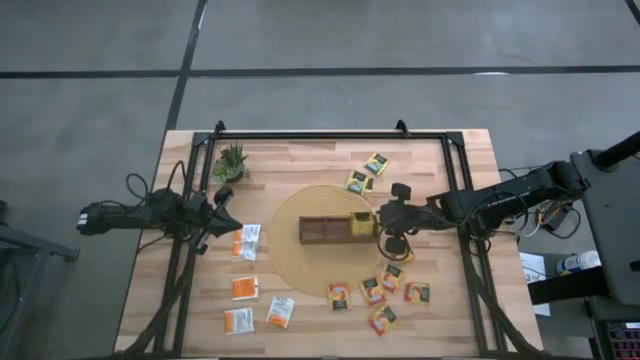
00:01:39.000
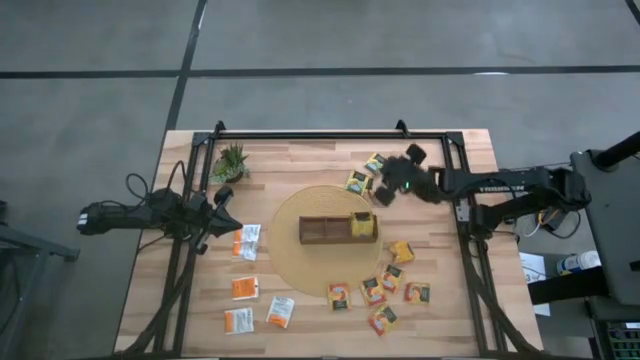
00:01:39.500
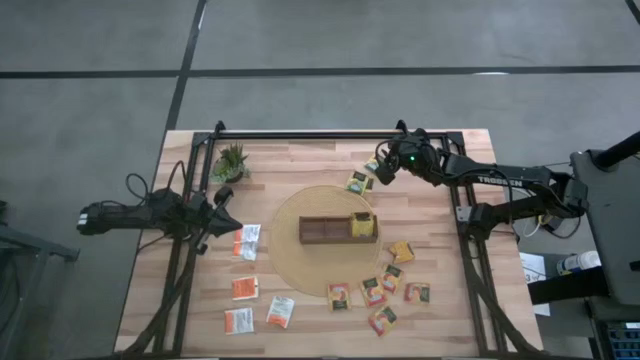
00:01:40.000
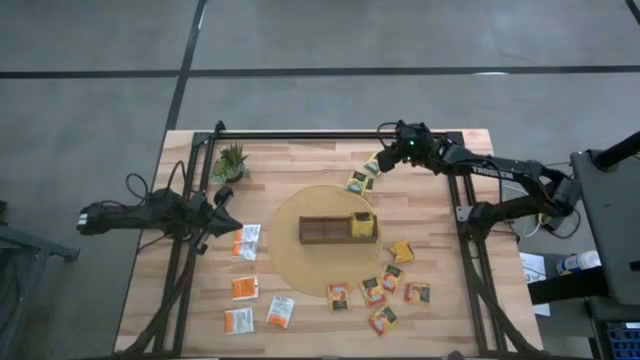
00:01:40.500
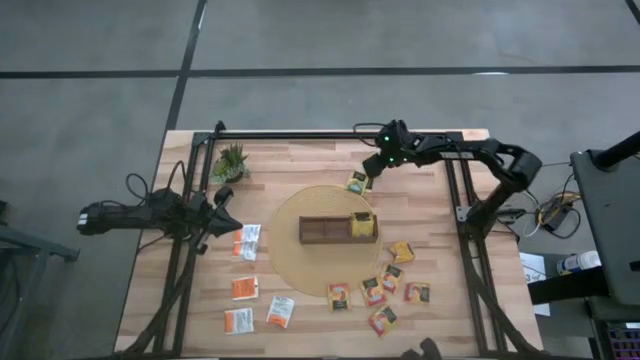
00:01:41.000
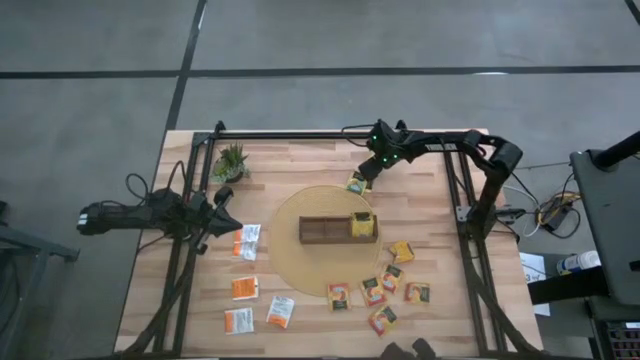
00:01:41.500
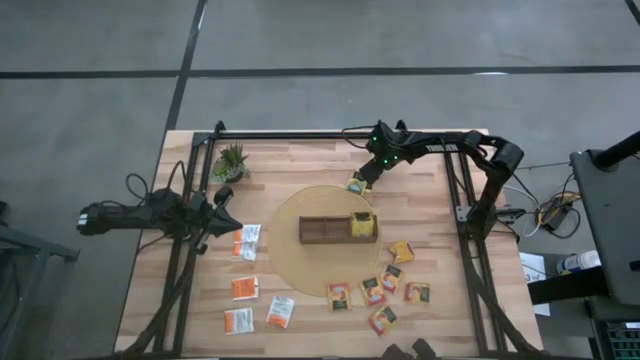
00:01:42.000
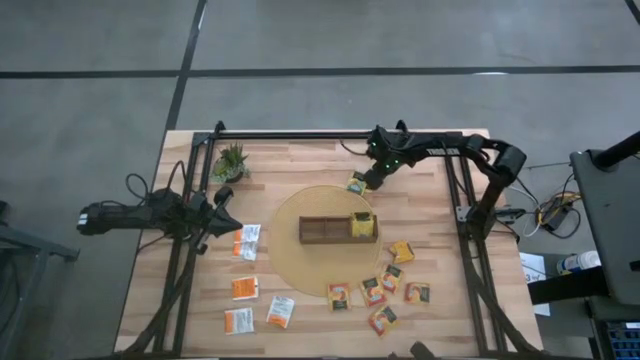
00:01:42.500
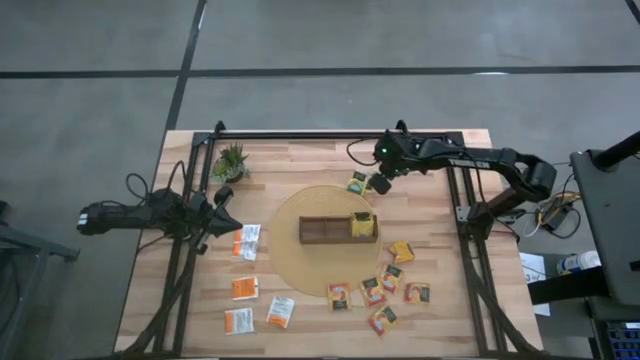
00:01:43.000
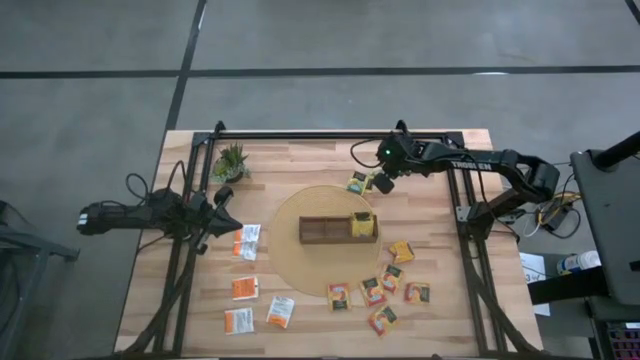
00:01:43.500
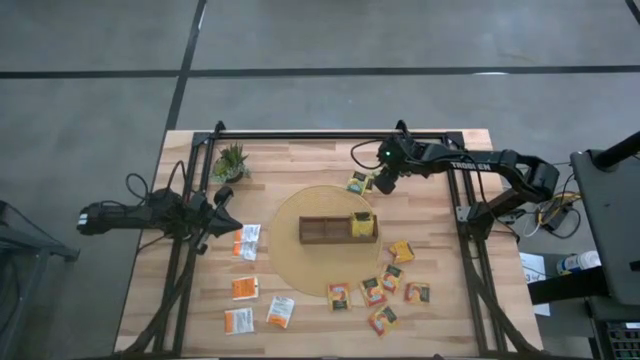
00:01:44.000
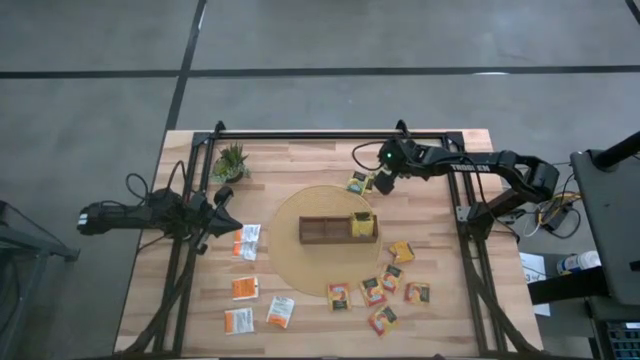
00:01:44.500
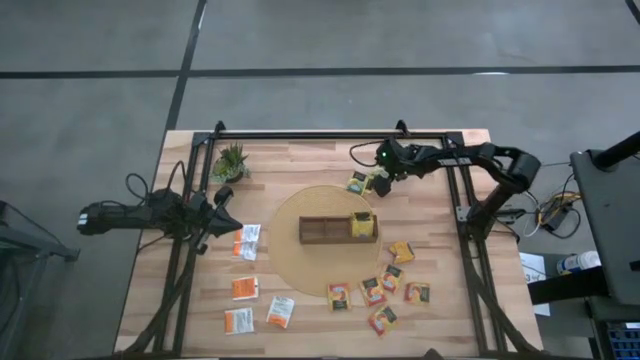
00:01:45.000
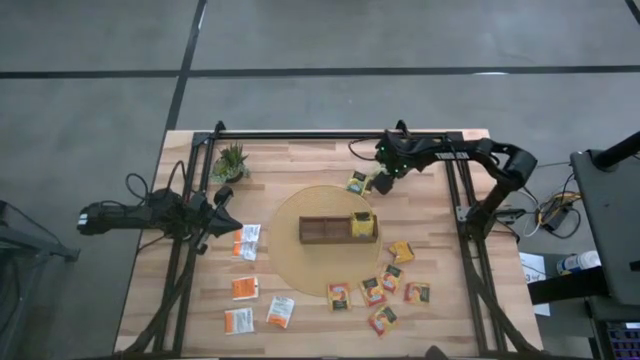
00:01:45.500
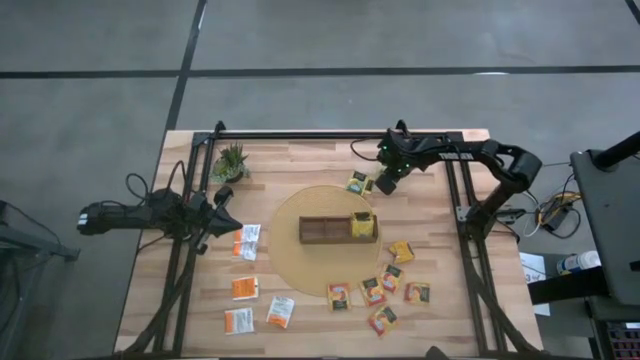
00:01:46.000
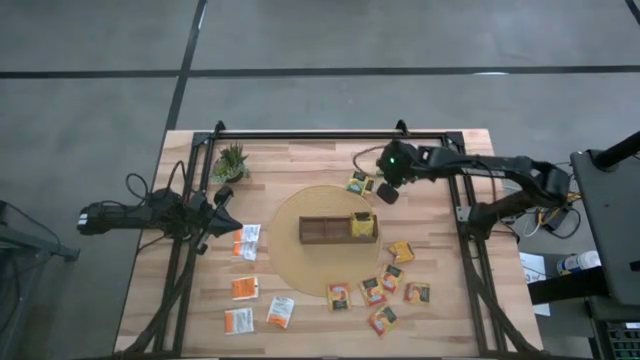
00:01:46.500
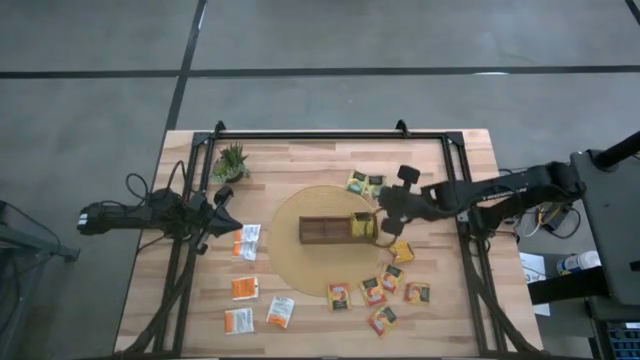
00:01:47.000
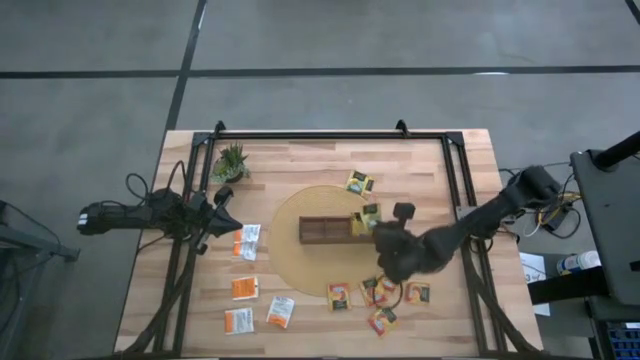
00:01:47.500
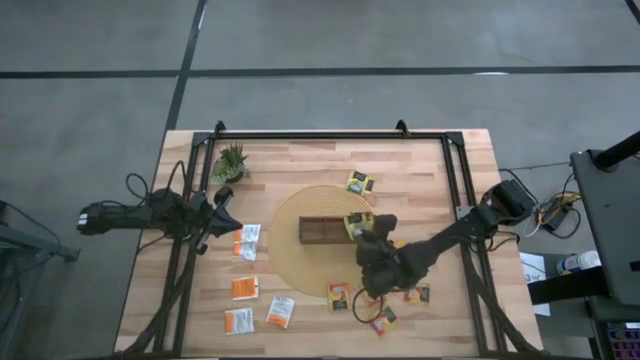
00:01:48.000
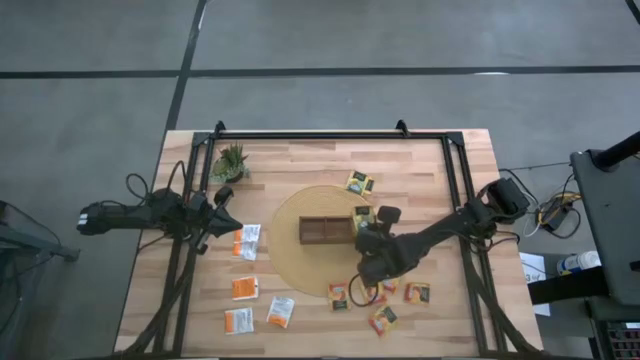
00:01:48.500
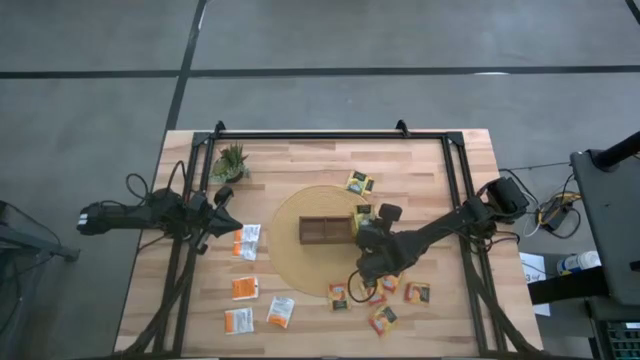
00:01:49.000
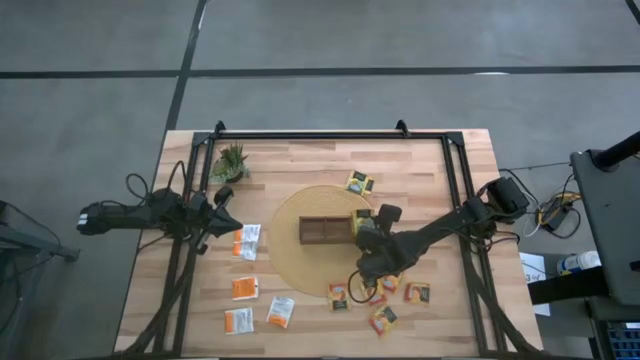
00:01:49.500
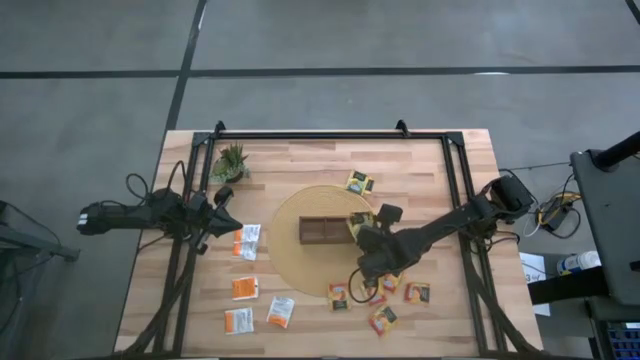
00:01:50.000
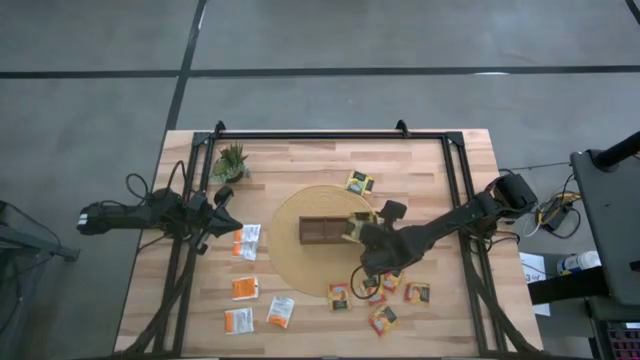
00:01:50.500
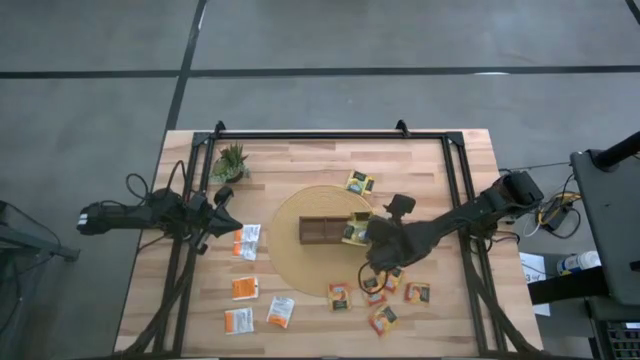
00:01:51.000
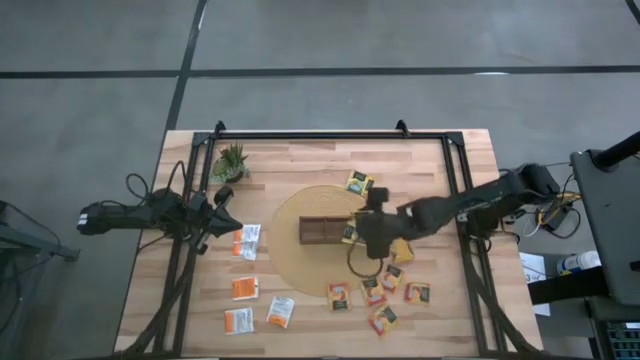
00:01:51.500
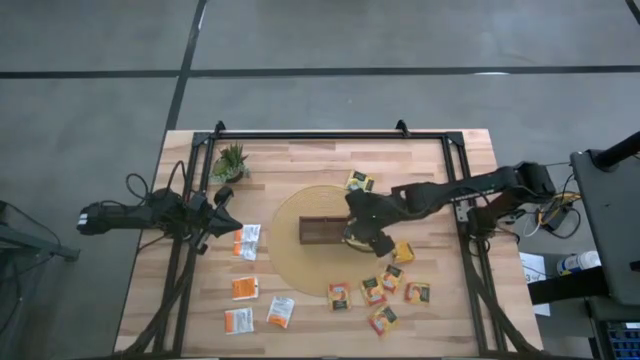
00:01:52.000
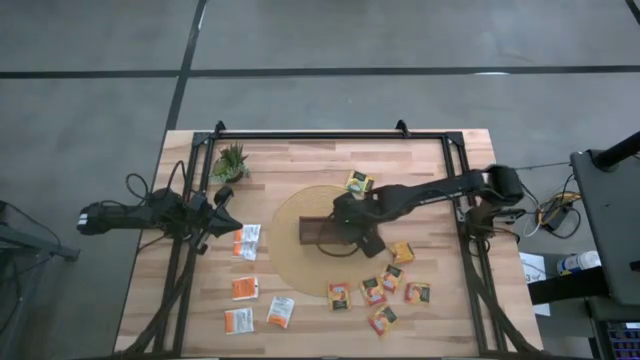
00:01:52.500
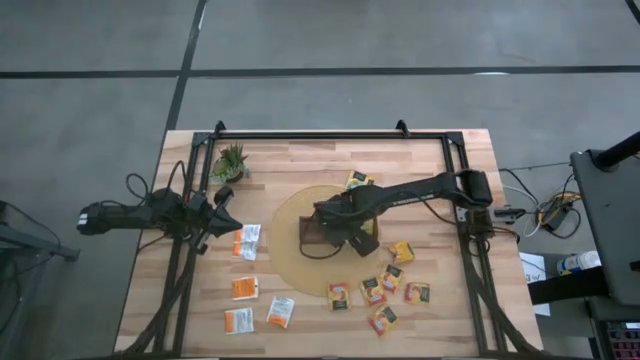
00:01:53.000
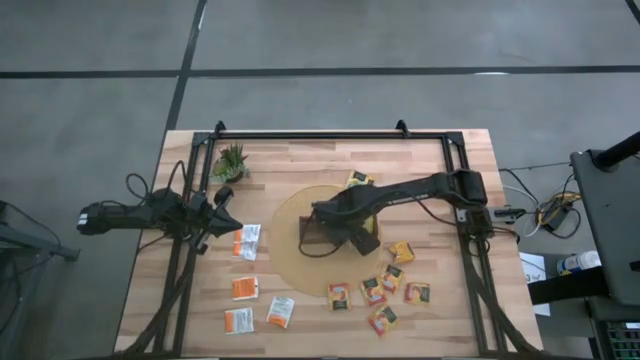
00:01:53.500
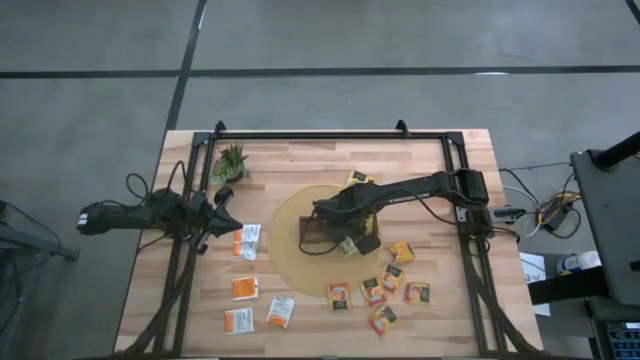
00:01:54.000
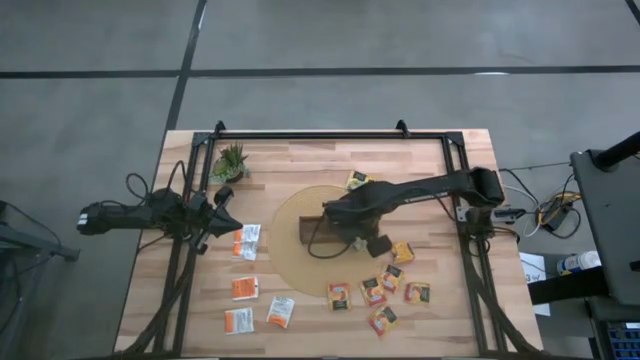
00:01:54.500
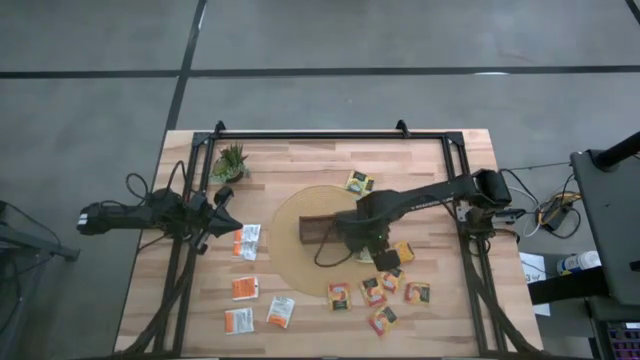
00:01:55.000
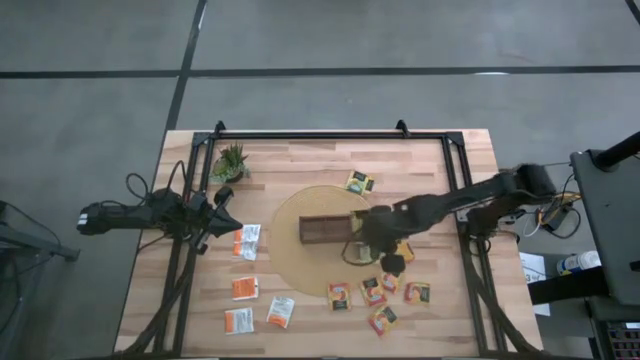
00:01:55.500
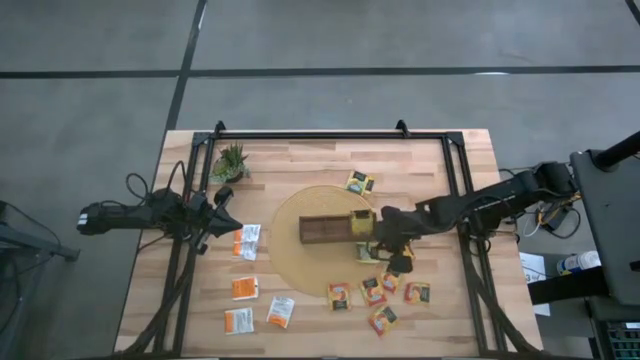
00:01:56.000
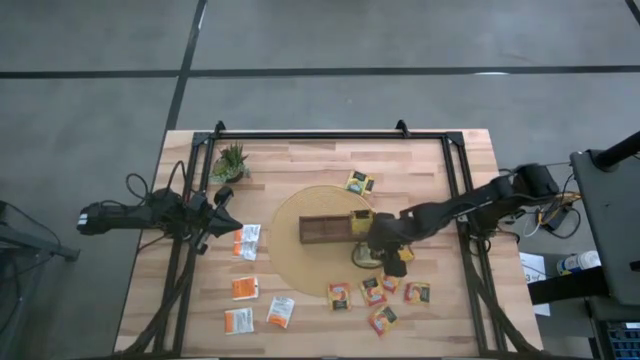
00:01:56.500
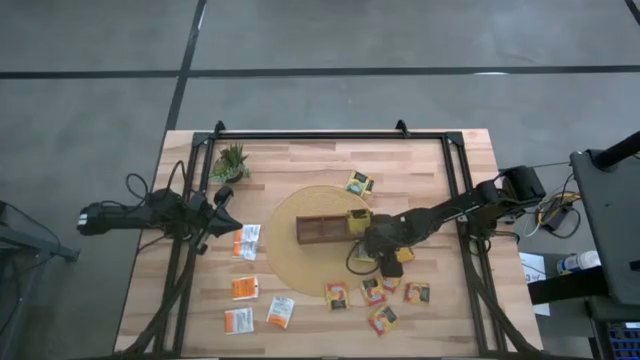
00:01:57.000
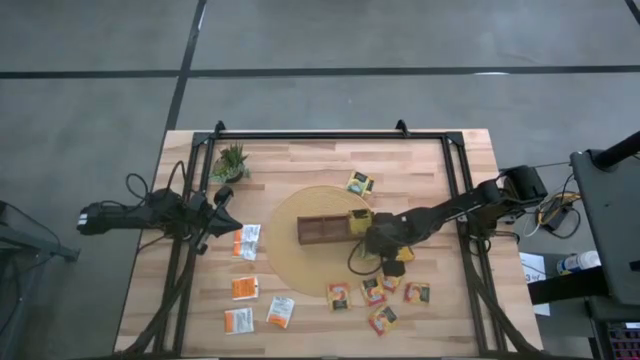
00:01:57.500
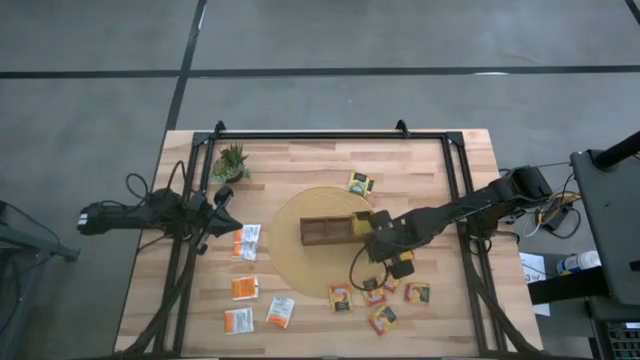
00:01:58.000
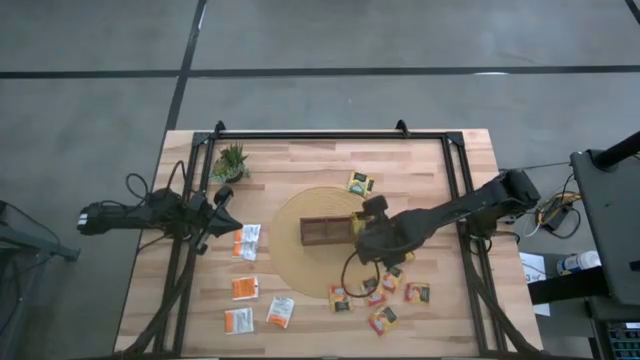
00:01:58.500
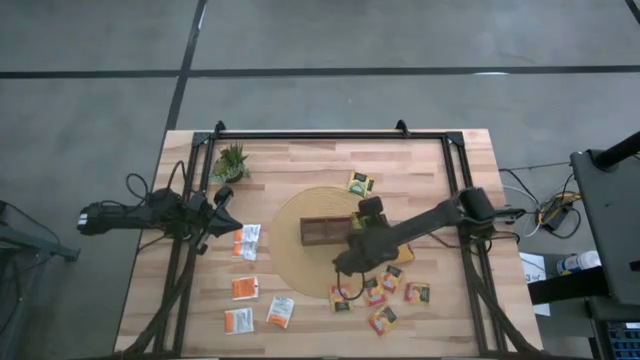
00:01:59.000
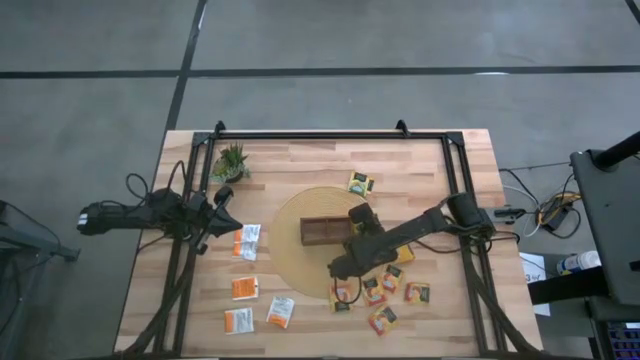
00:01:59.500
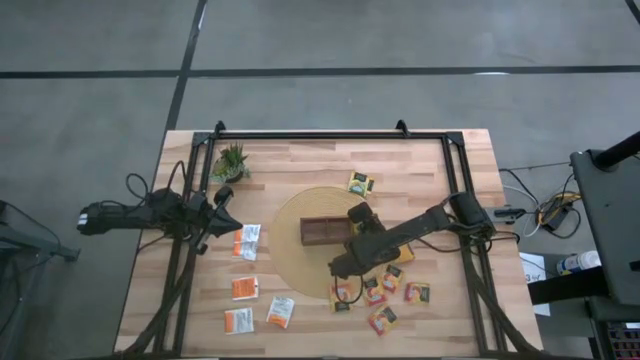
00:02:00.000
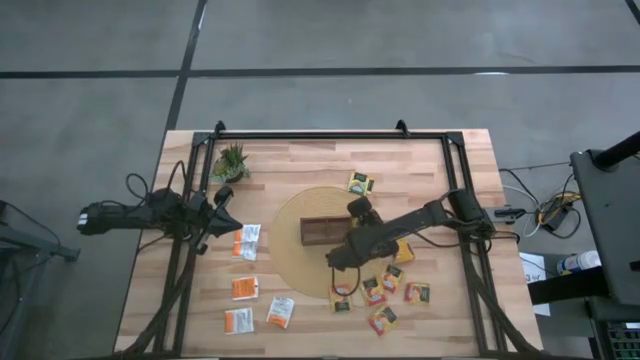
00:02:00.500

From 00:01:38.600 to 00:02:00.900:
Task: Pick & Place Tea
Put the right yellow tea bag into the right of the wooden organizer
